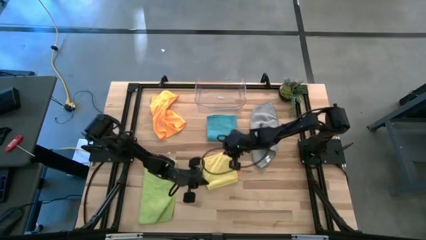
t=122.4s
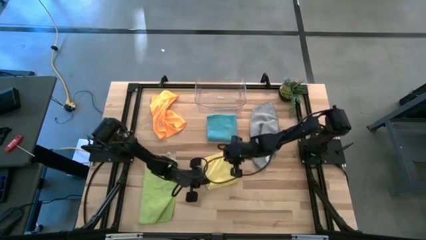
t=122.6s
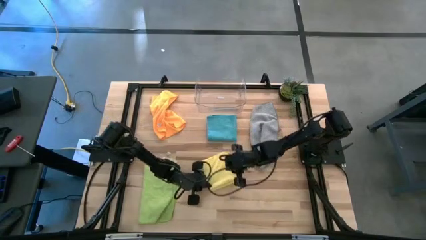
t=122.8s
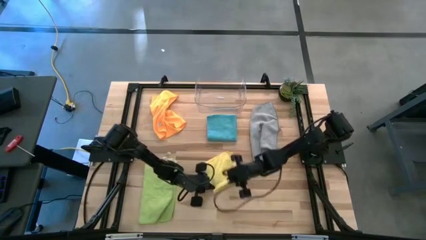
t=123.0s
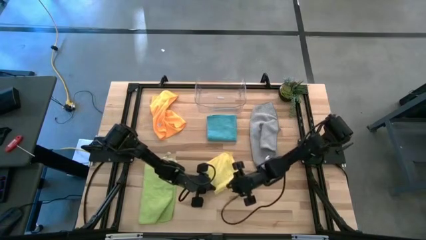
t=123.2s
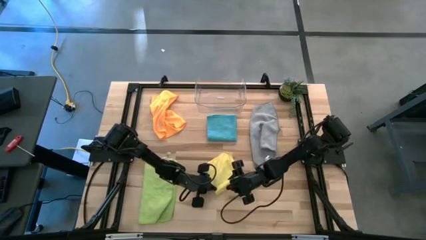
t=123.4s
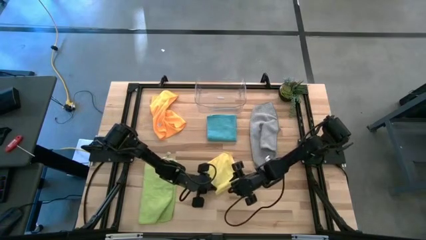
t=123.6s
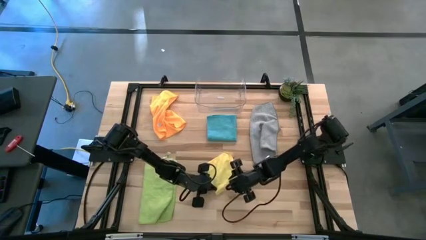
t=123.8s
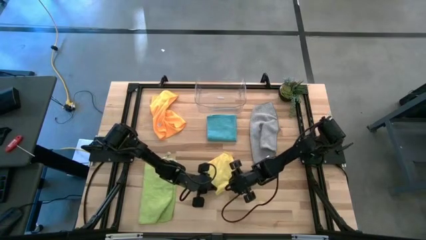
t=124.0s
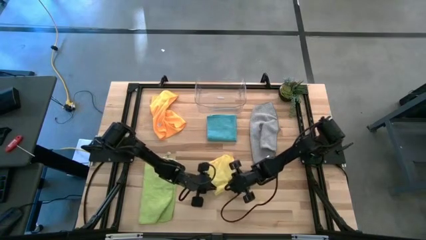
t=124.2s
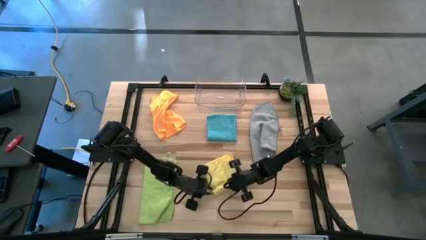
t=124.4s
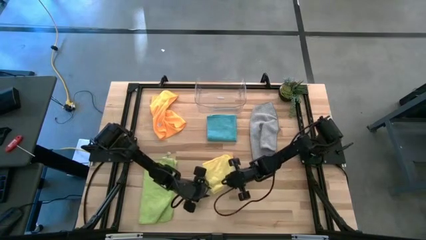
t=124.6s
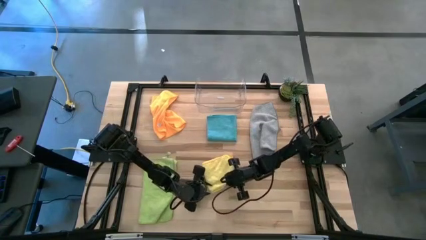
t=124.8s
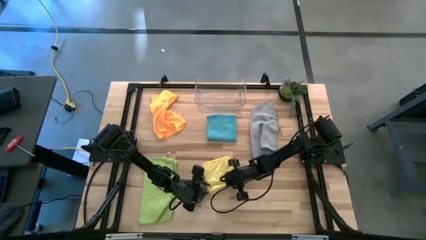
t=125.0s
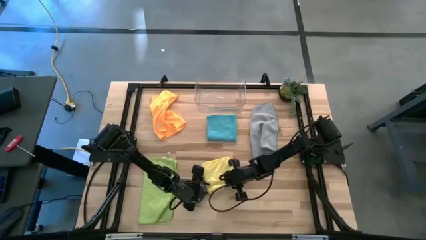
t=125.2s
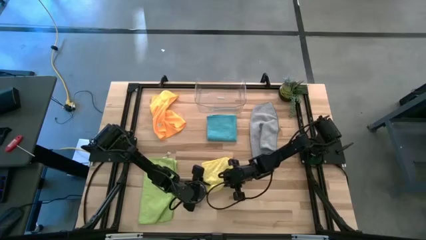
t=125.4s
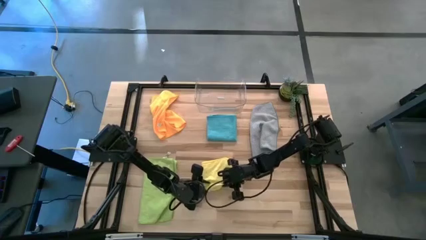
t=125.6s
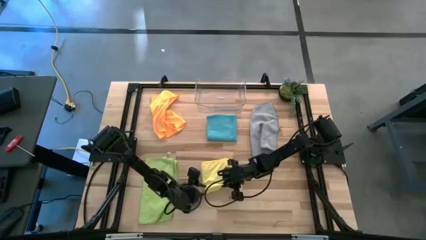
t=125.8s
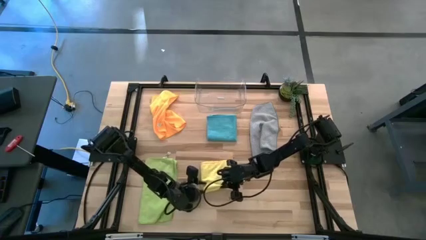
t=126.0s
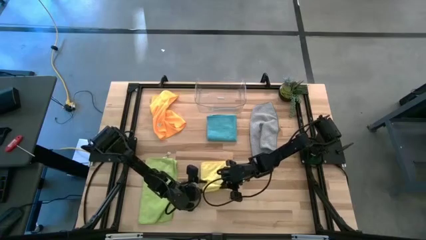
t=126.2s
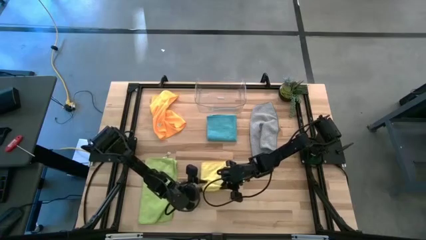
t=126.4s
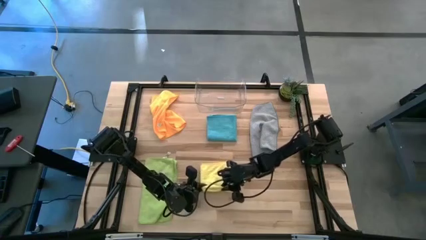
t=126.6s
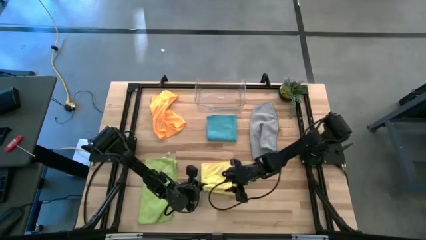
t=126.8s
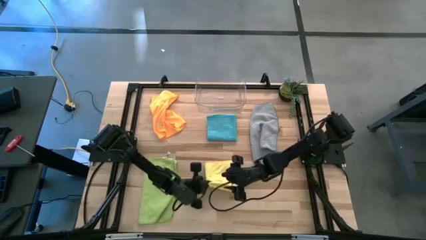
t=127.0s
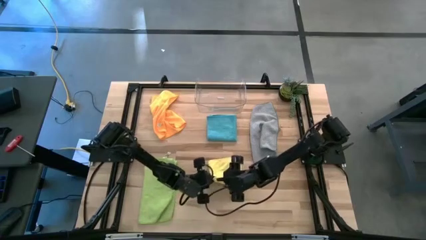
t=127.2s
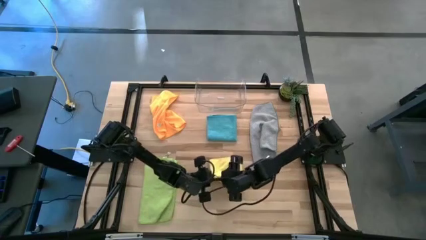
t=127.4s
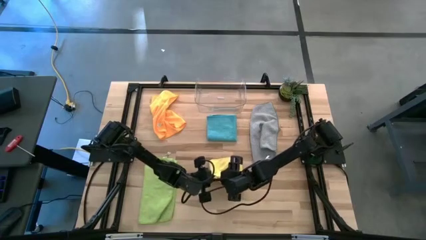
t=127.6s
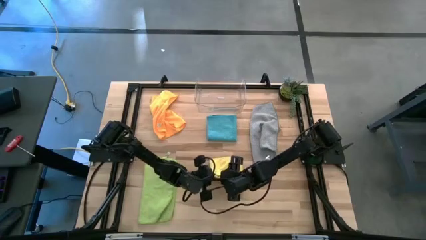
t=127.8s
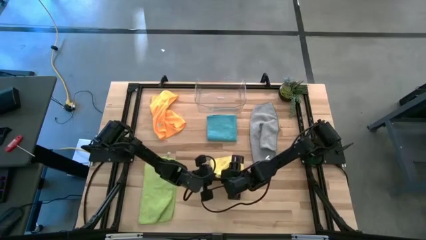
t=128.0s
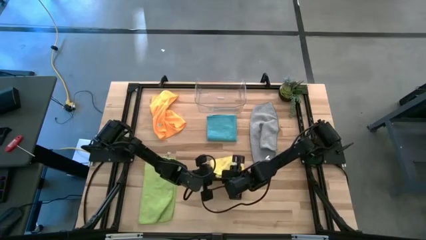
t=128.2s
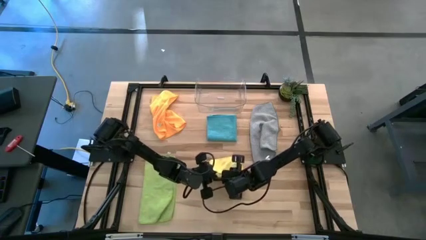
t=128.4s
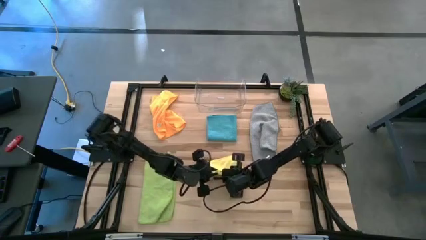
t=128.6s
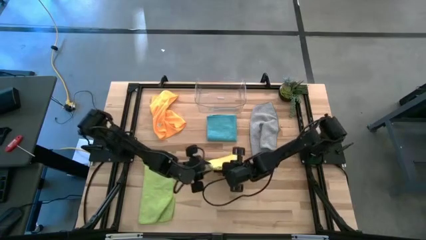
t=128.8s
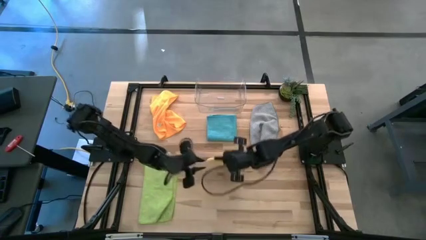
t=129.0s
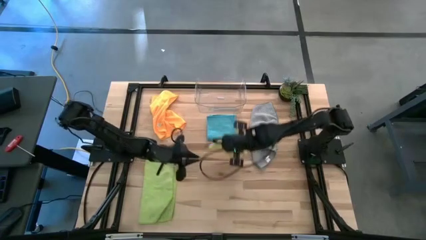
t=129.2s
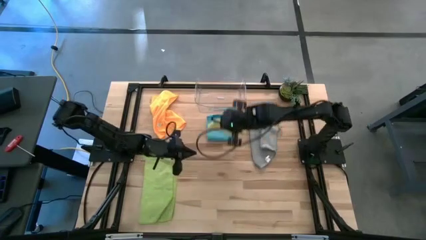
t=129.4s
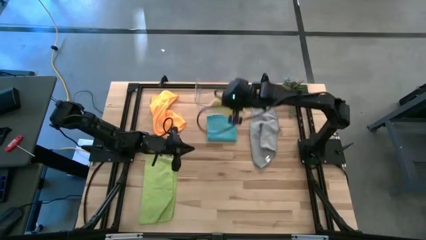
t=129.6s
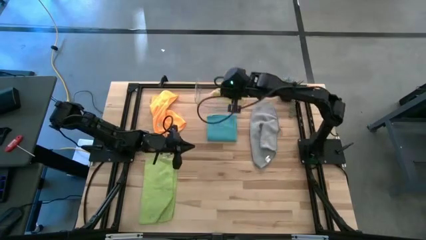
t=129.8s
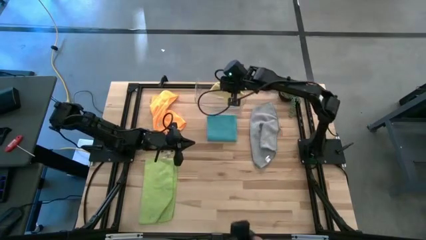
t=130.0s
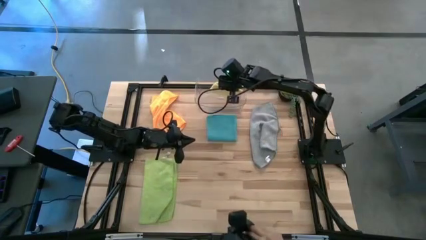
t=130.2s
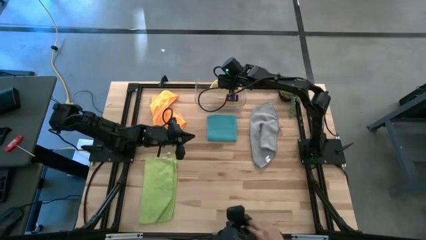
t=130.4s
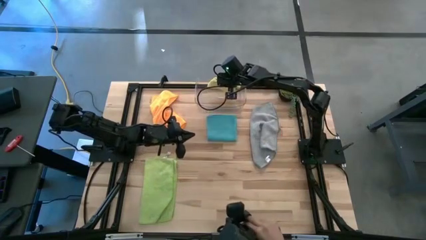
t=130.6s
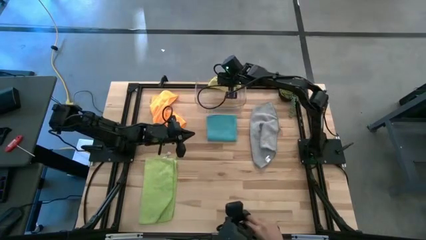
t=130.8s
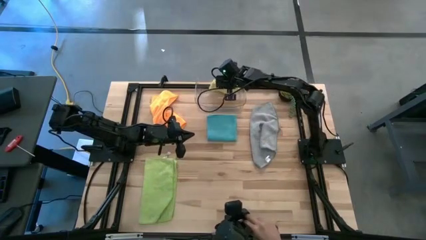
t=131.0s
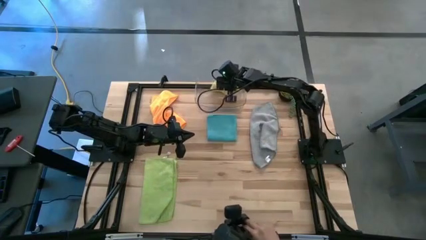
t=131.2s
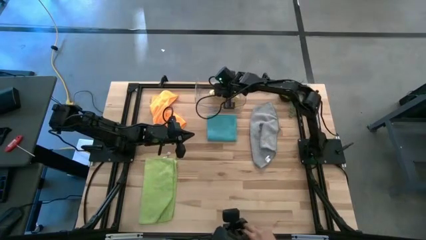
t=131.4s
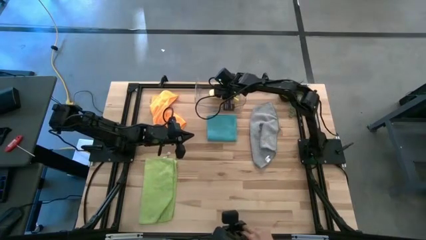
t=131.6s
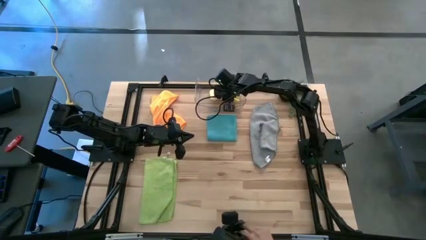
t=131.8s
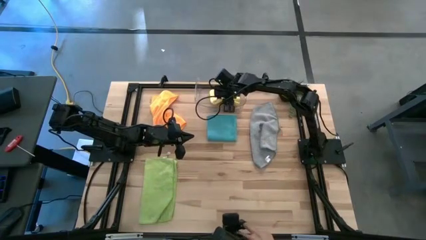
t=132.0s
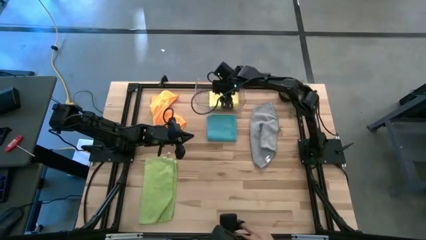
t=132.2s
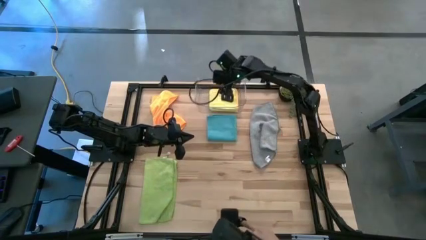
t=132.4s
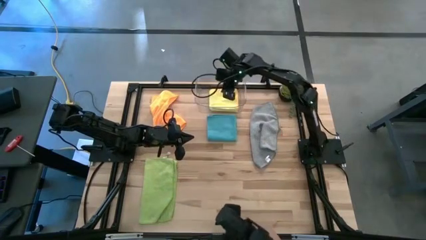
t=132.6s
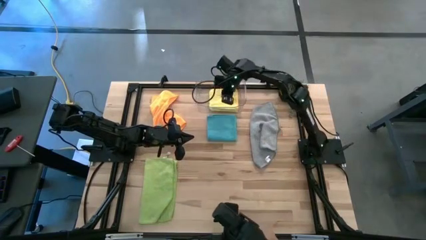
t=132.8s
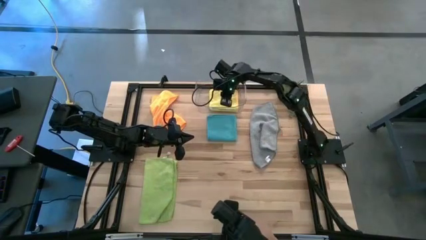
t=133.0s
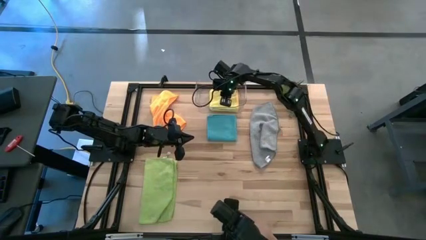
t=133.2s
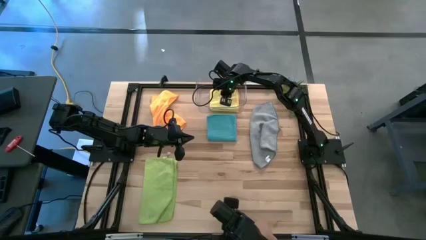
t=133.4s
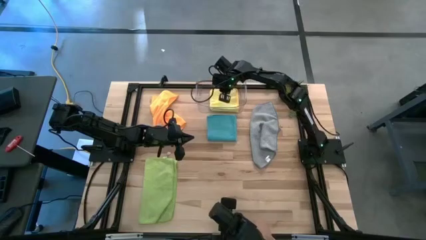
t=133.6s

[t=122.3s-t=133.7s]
Task: Fold microfiber towels
Put the yellow towel into the transparent bin
